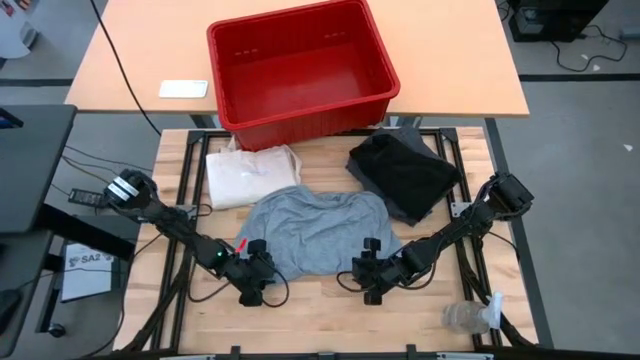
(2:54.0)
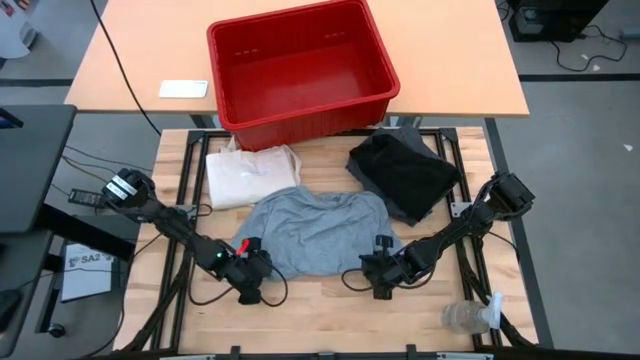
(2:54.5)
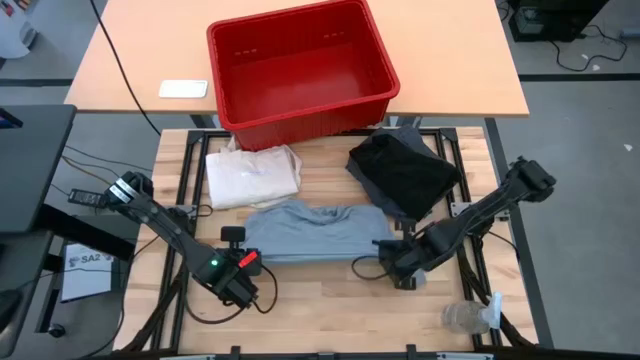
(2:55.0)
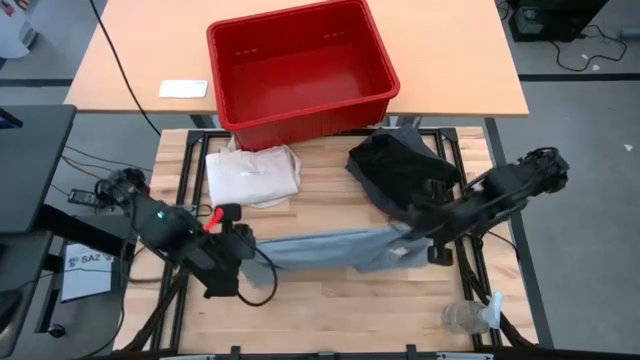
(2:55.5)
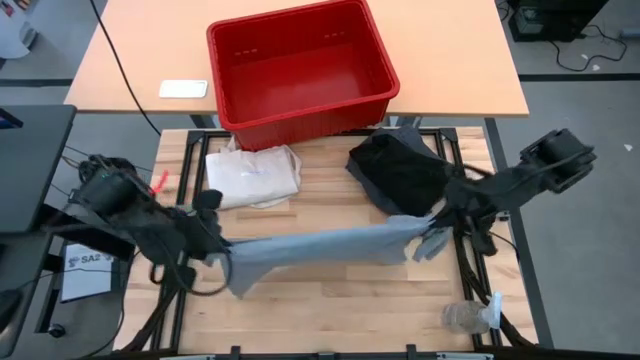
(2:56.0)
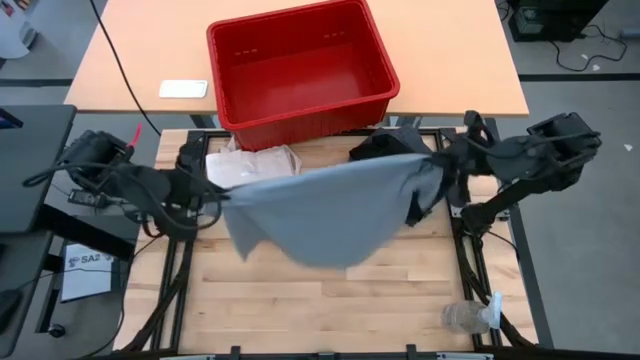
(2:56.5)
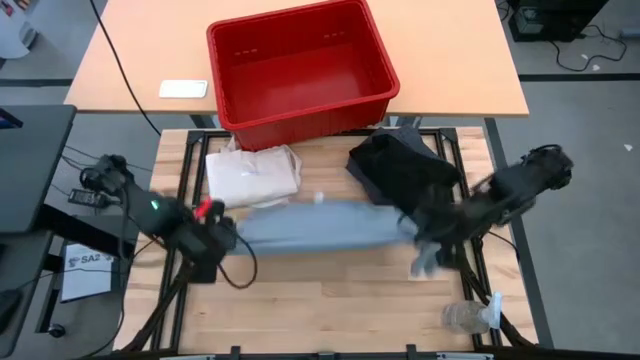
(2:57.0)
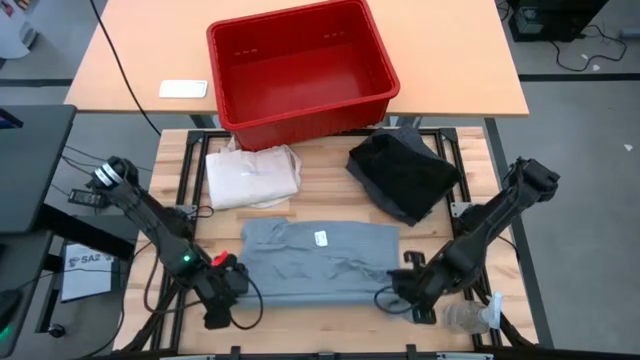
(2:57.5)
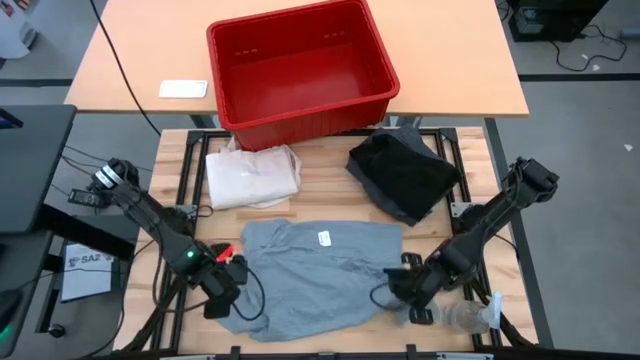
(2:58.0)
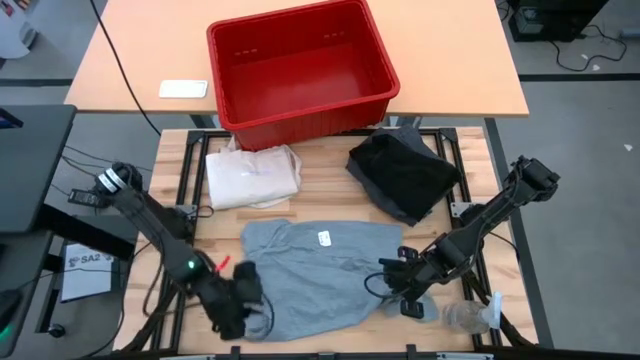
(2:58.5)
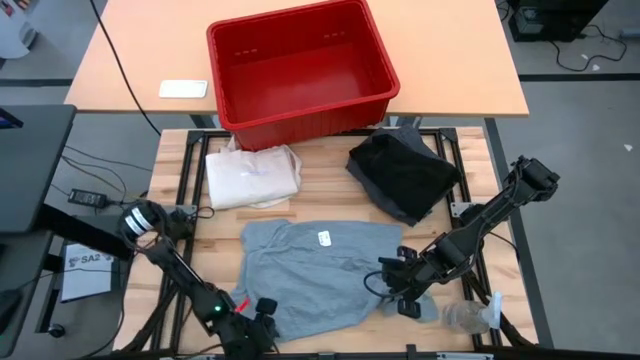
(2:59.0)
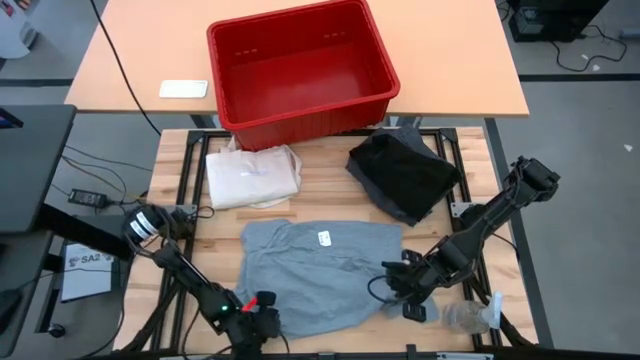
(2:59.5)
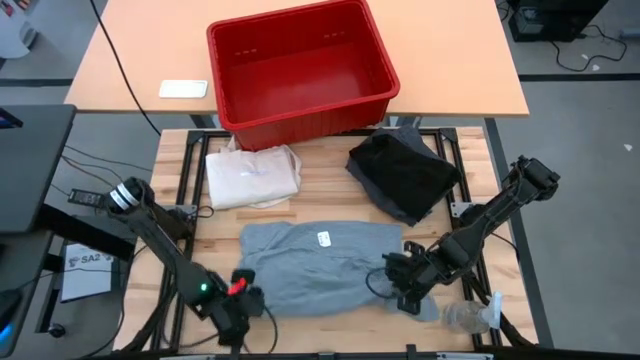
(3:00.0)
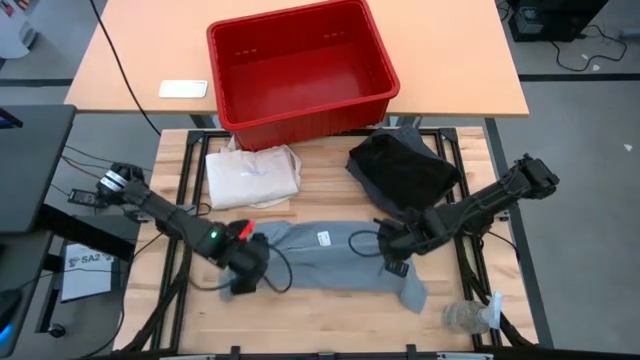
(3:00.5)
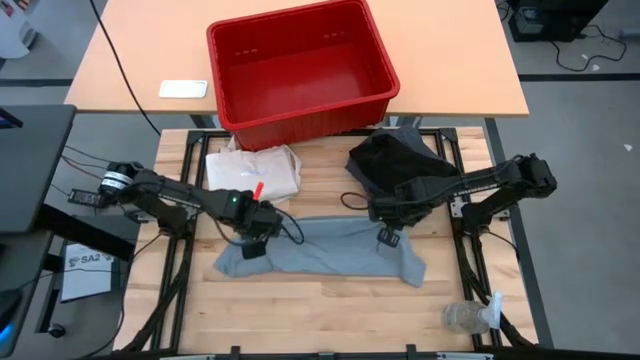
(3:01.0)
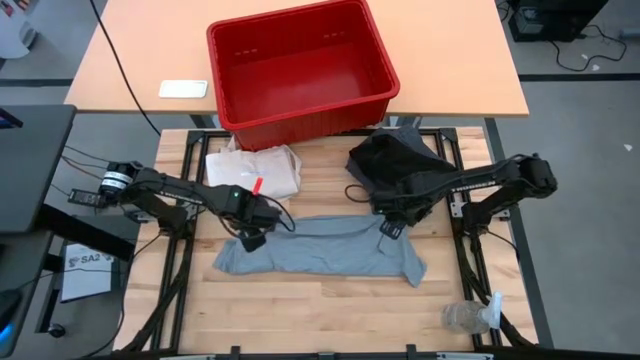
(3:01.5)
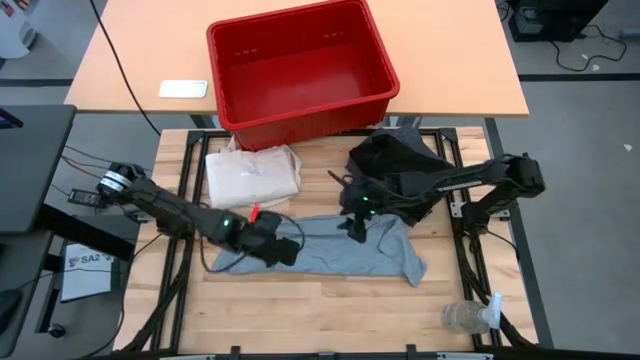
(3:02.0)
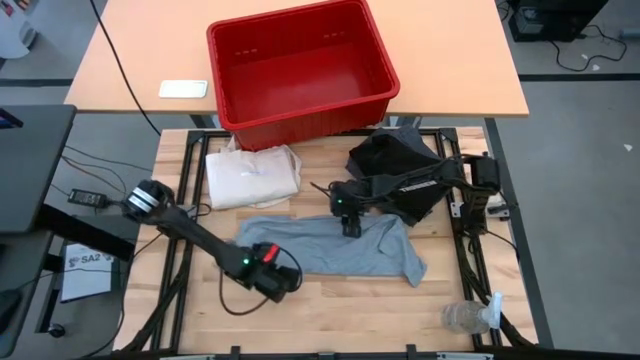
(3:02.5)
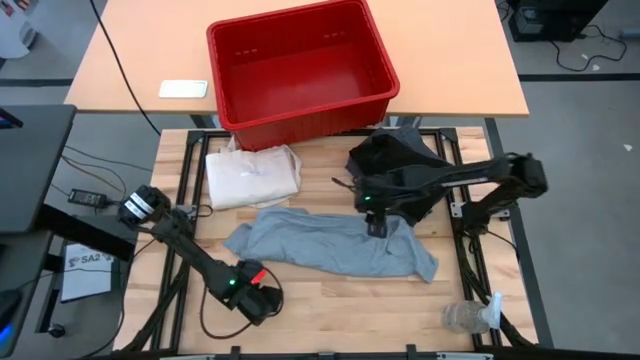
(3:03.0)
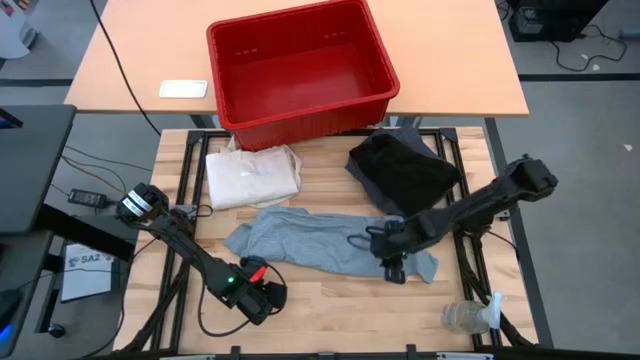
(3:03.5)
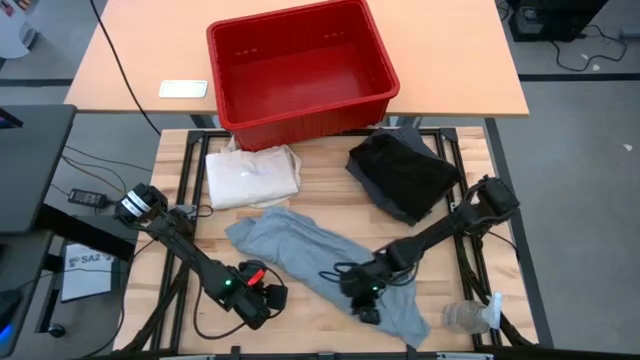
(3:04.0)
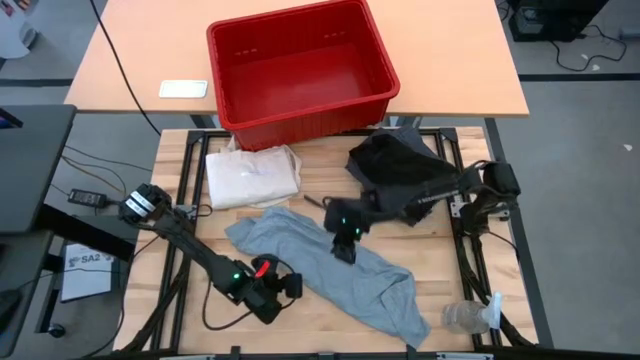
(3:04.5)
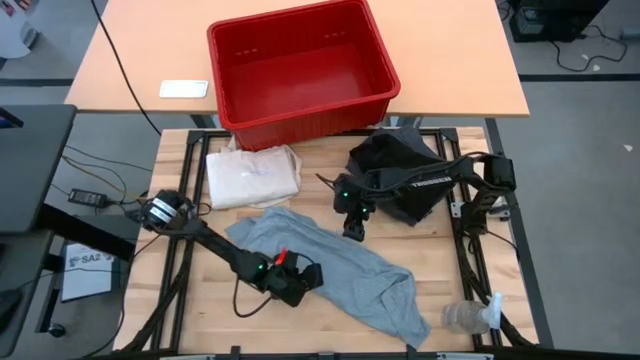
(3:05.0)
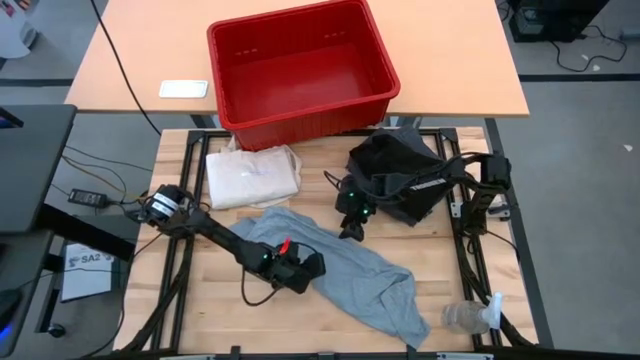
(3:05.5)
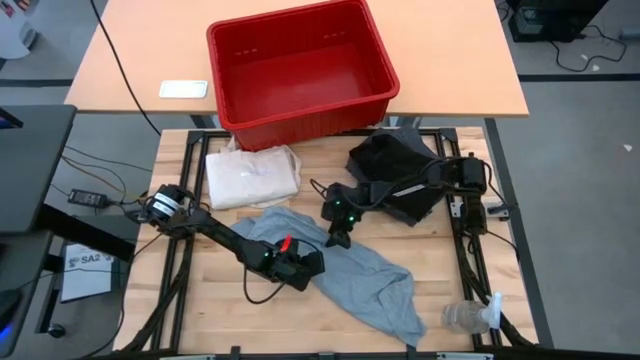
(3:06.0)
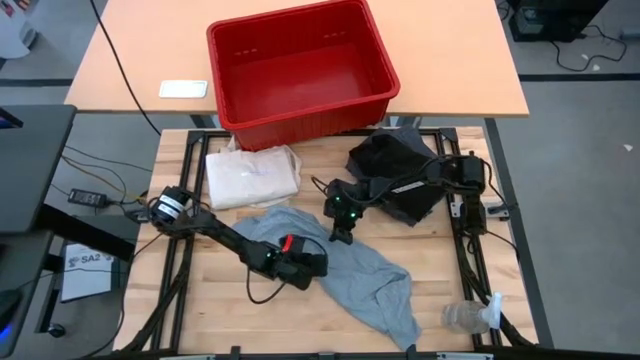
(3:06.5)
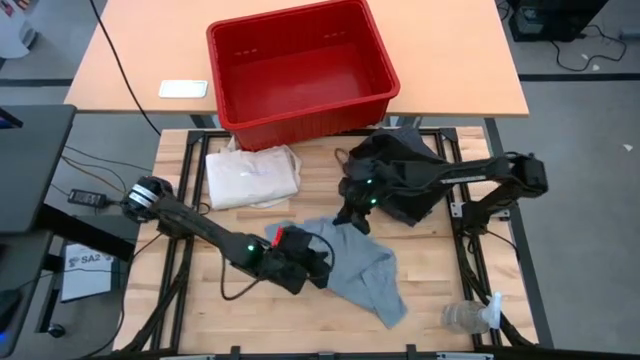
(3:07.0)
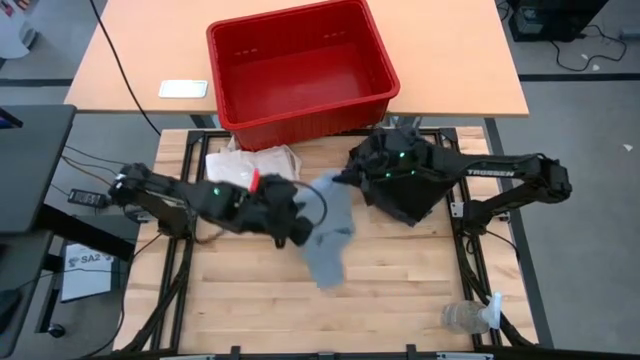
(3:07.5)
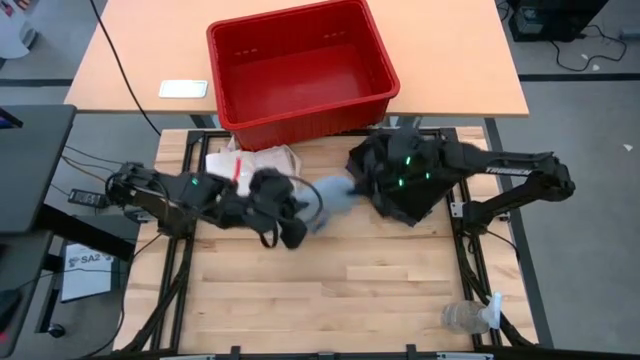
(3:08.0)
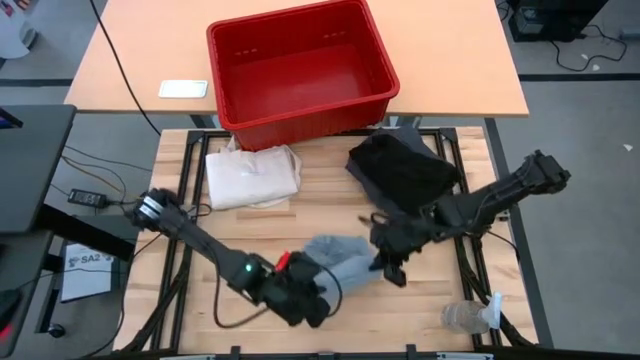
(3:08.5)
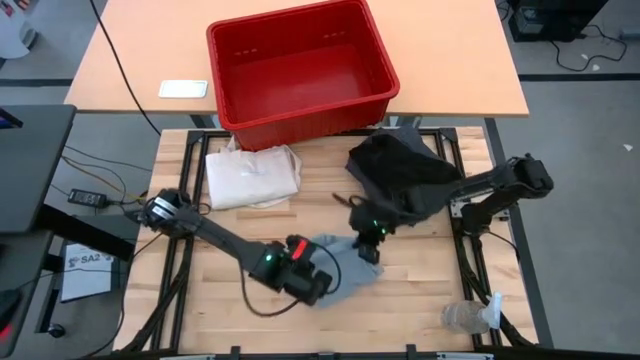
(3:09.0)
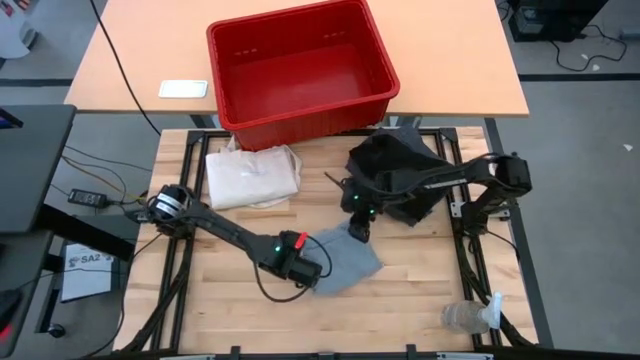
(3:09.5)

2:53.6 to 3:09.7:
Task: Fold laundry
Fold the gray shirt

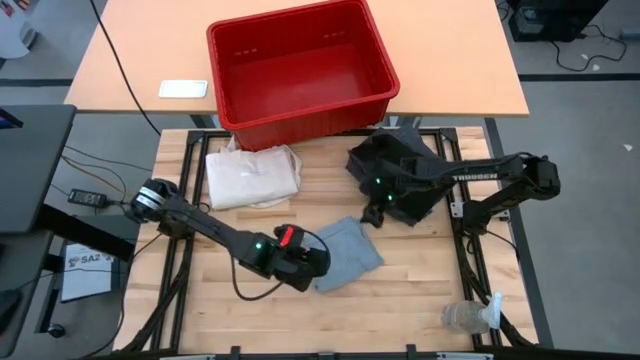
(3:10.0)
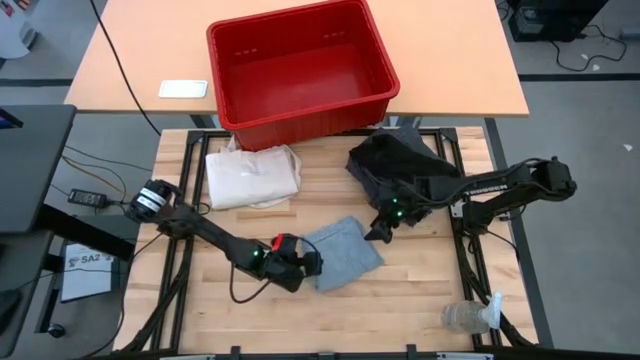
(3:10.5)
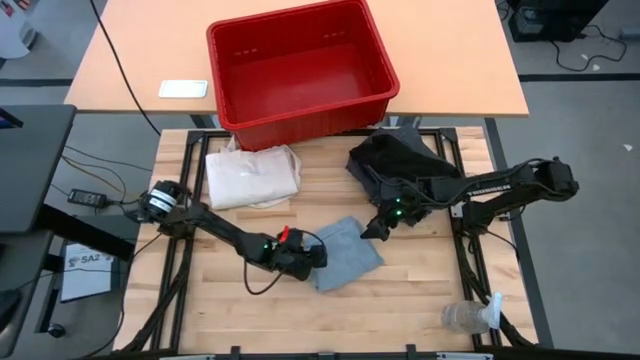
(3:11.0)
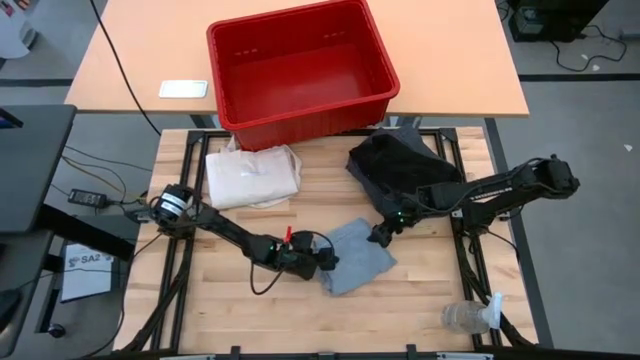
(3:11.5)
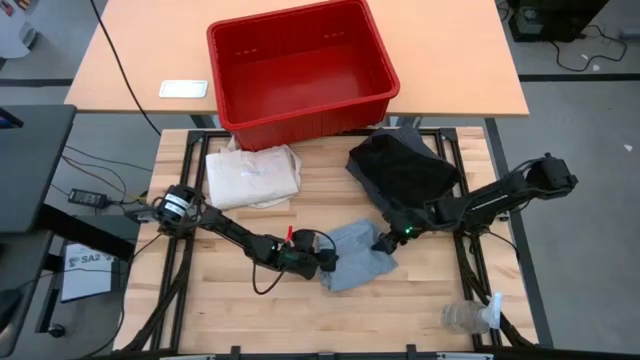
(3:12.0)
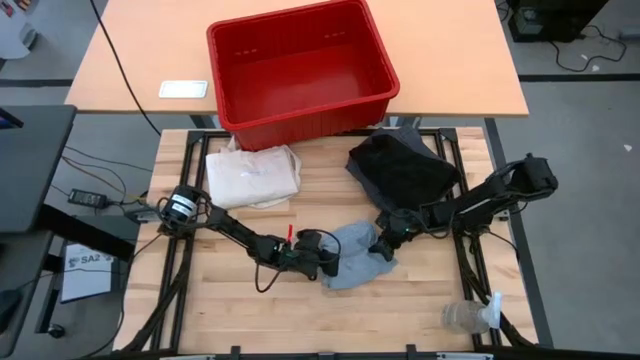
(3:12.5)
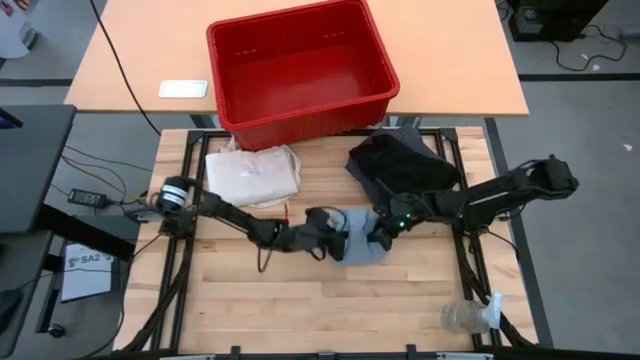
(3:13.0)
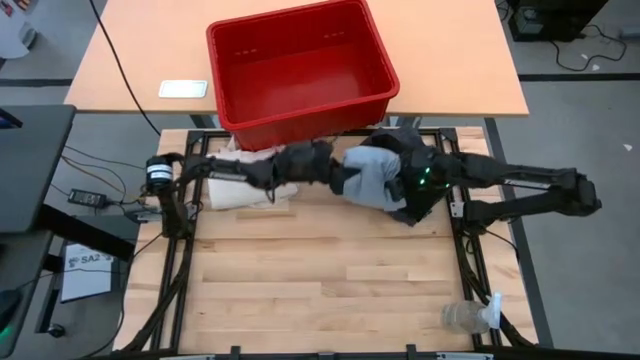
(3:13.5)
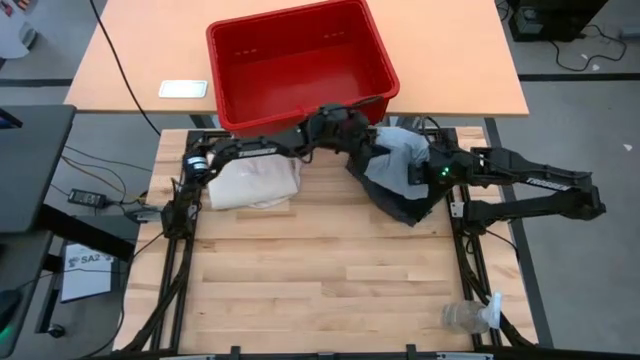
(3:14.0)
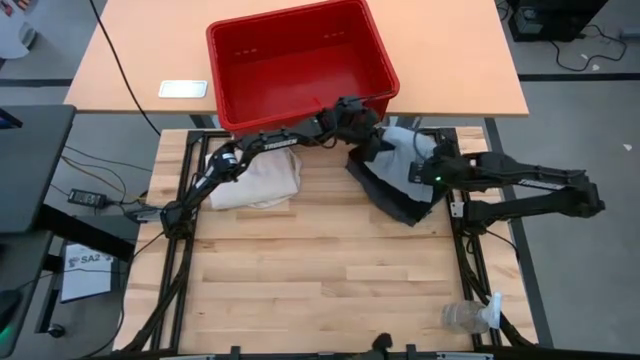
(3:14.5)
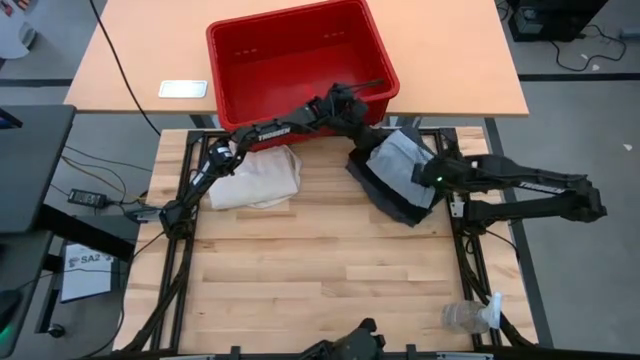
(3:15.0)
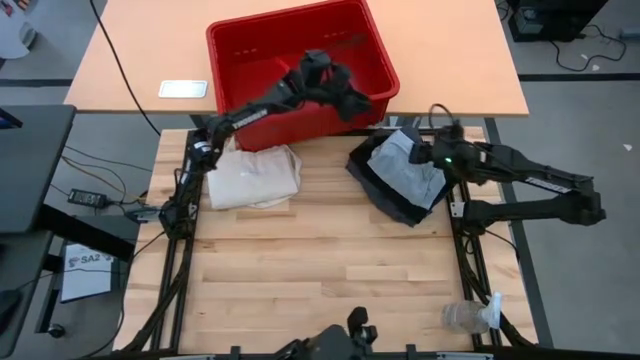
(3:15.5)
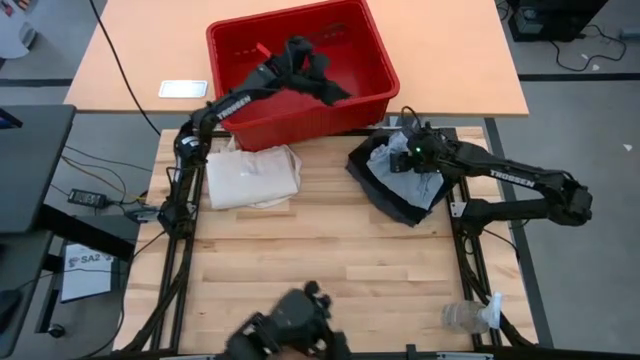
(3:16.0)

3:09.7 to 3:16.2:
Stack the gray shirt on top of the black folded shirt
